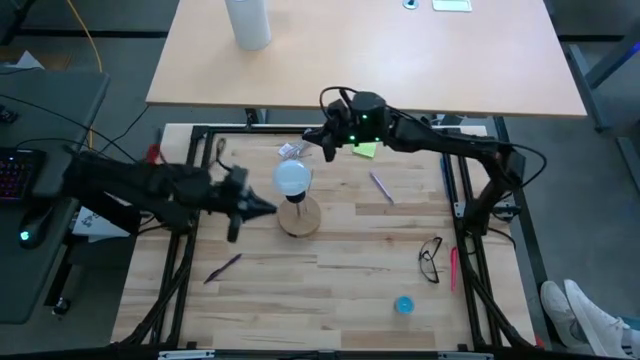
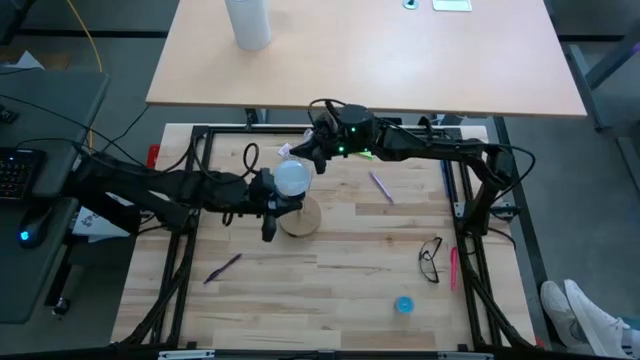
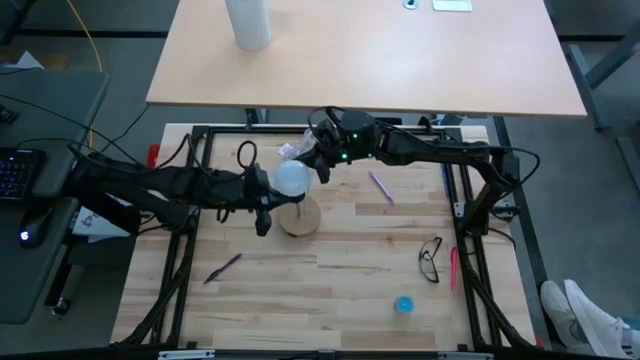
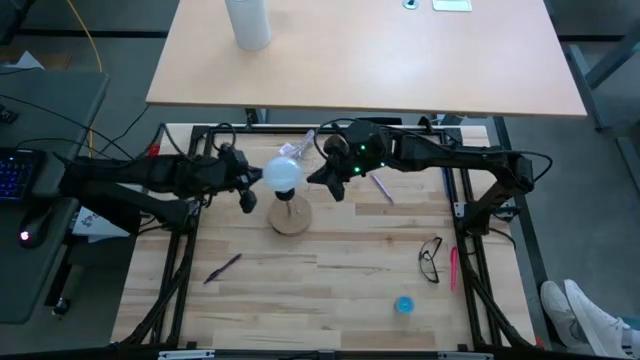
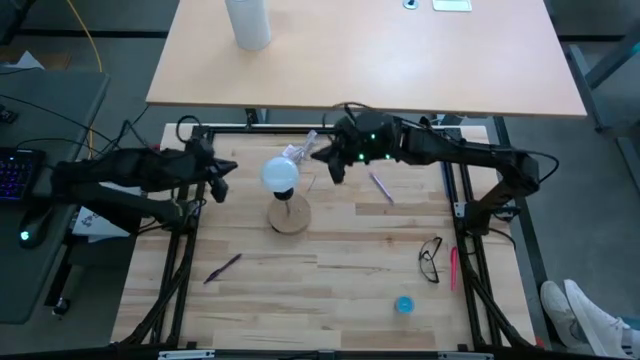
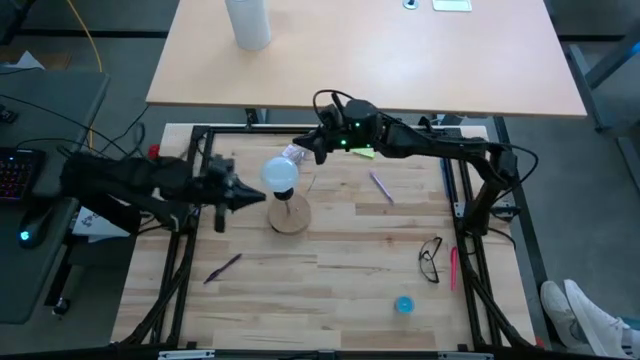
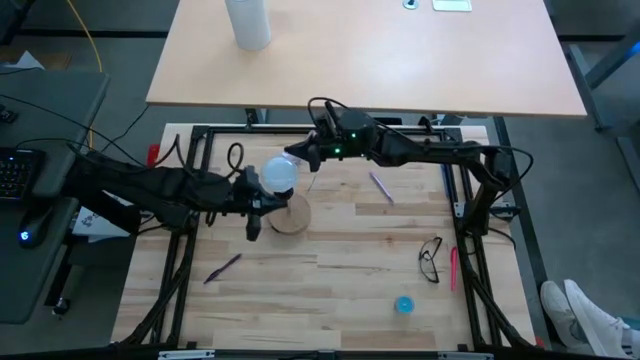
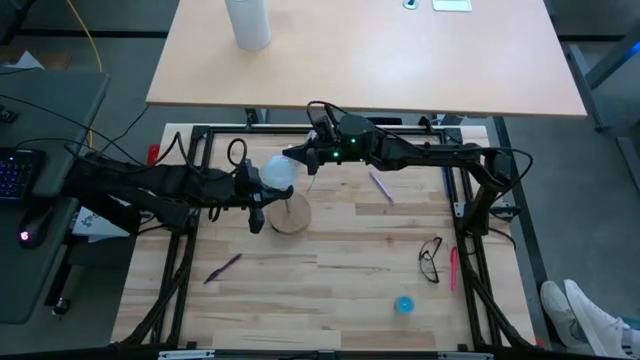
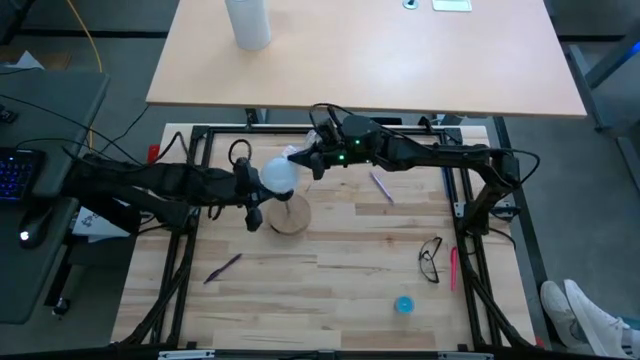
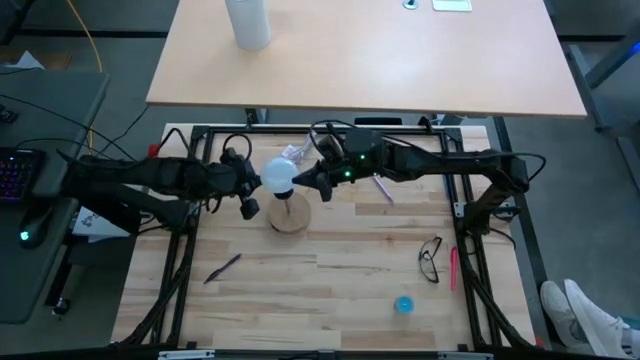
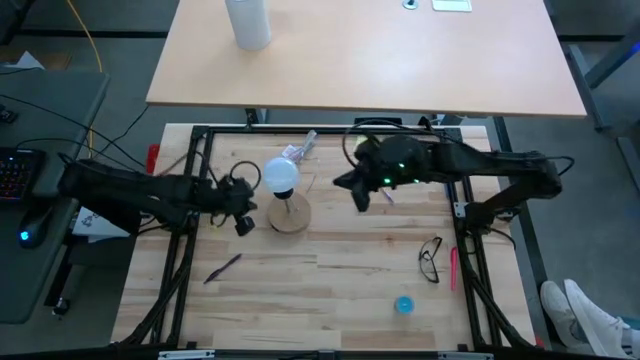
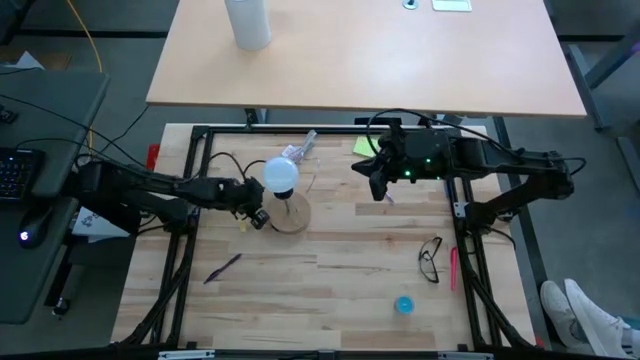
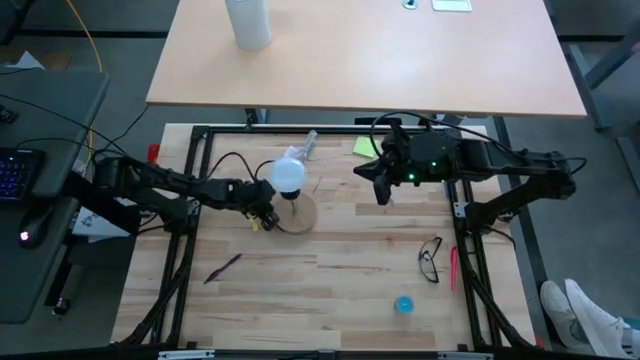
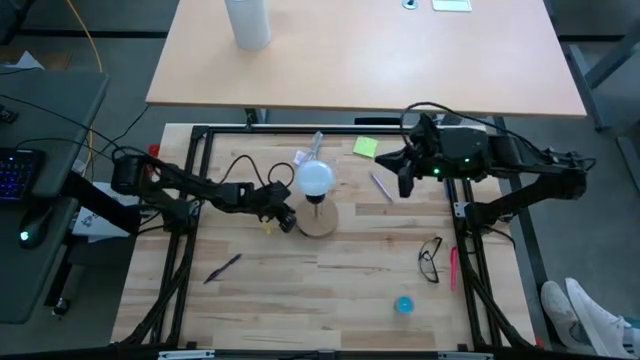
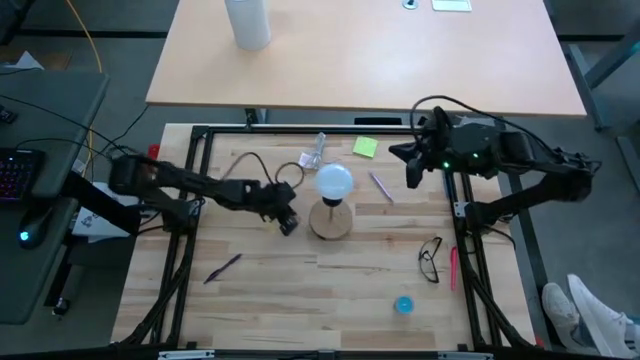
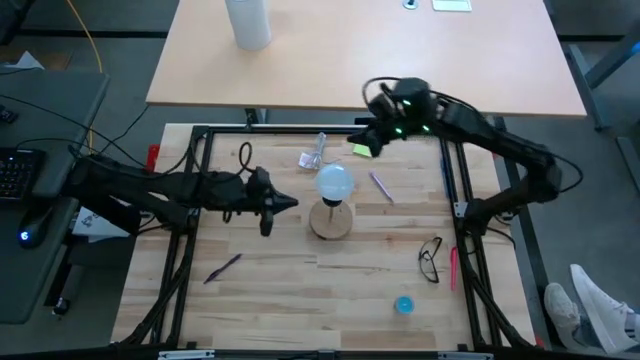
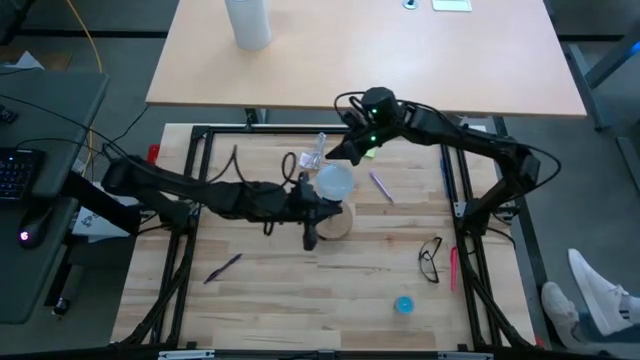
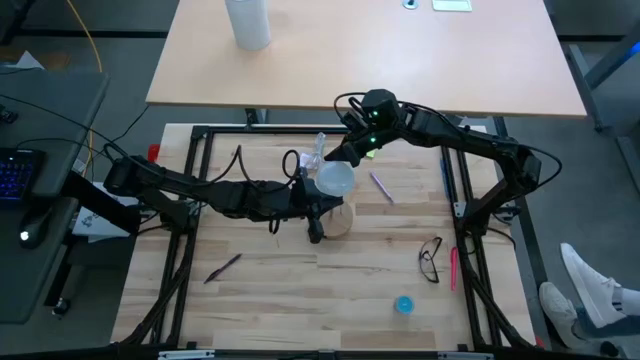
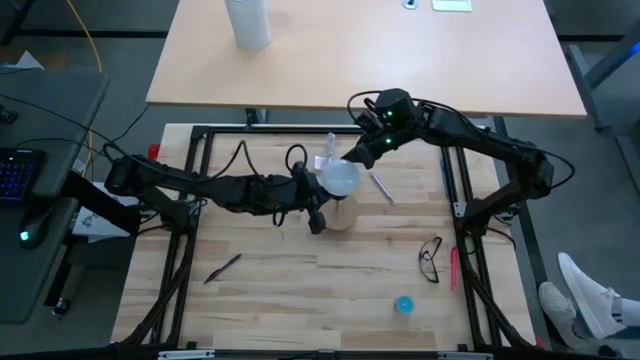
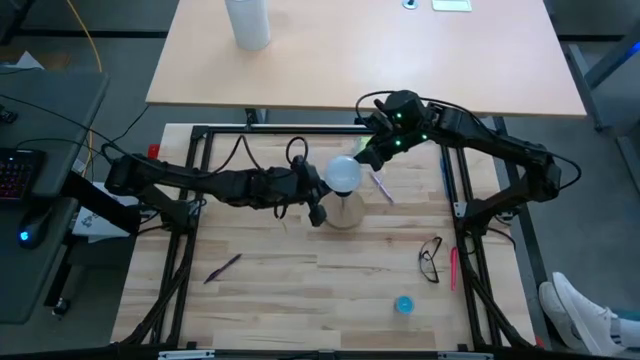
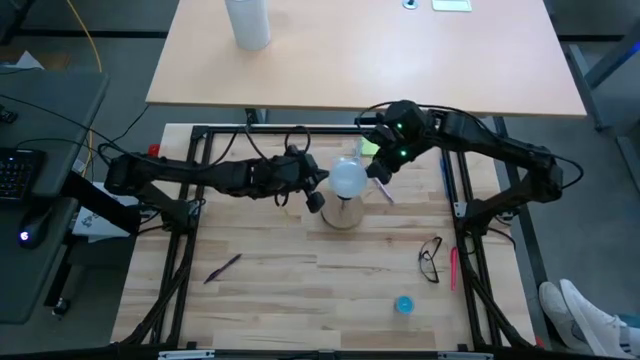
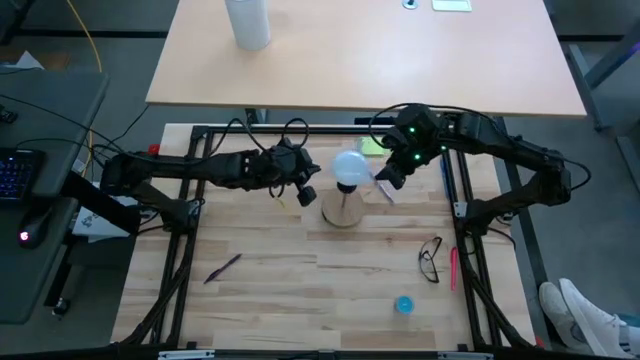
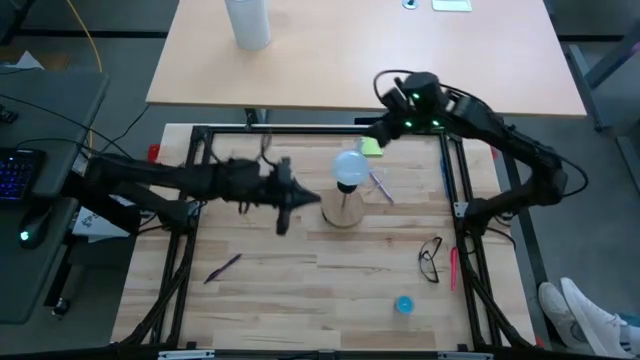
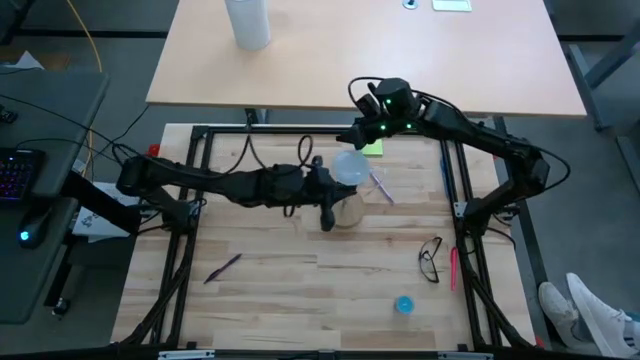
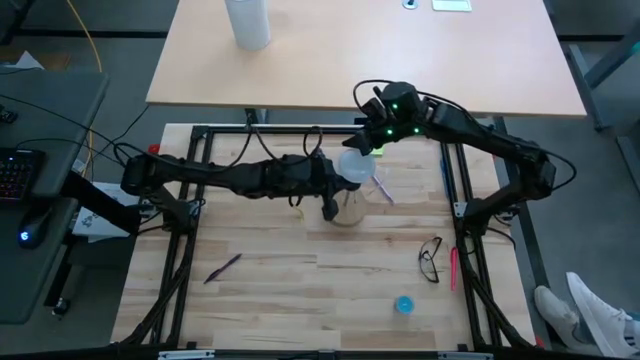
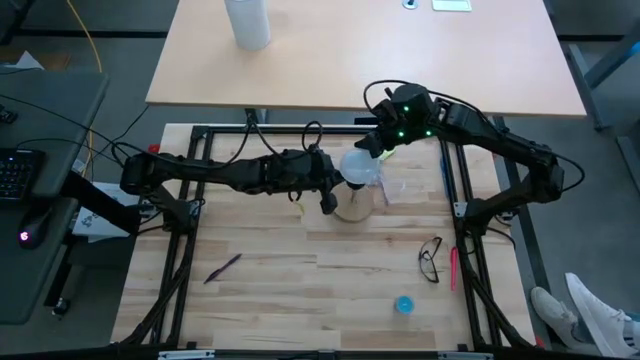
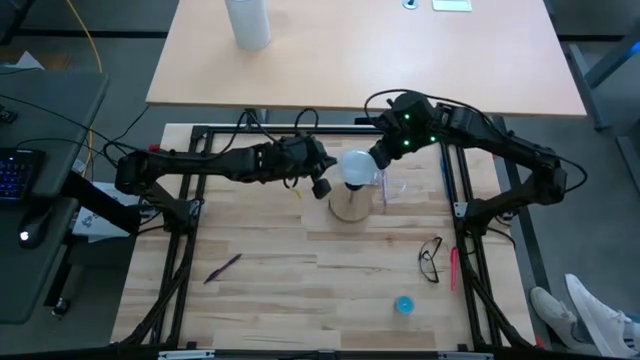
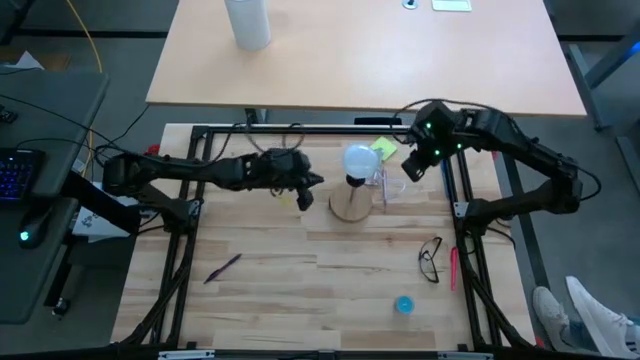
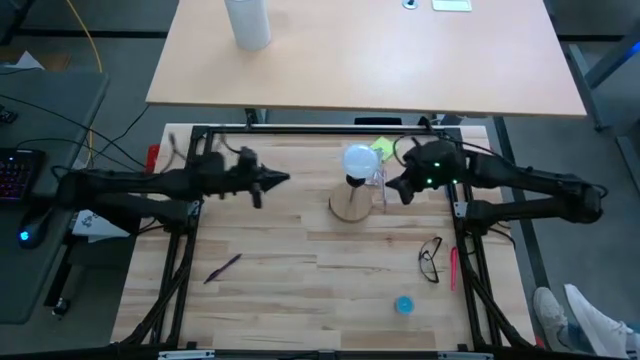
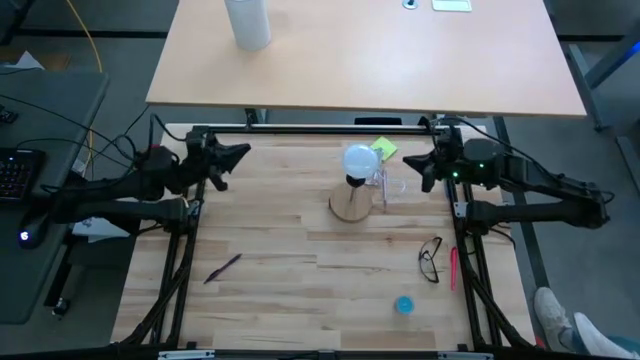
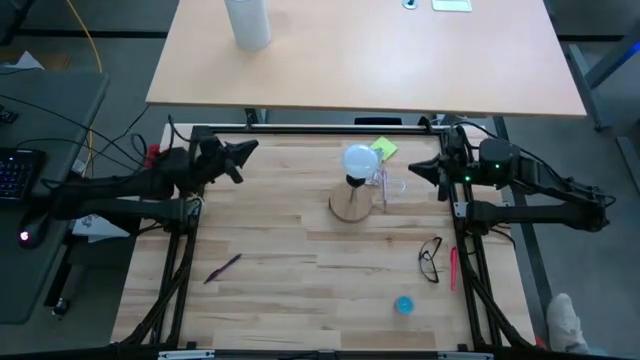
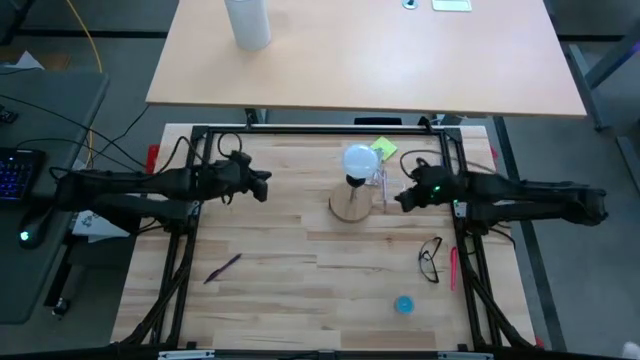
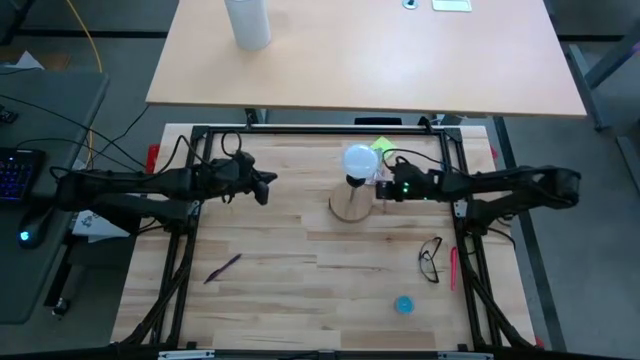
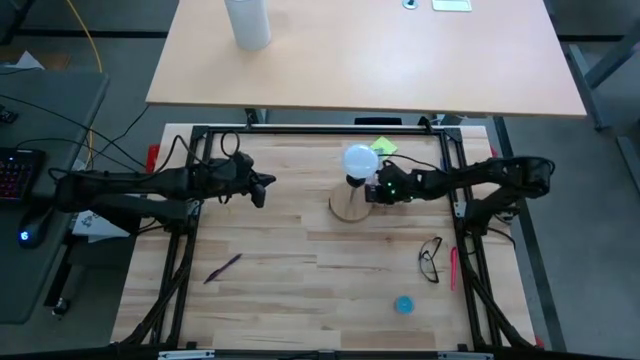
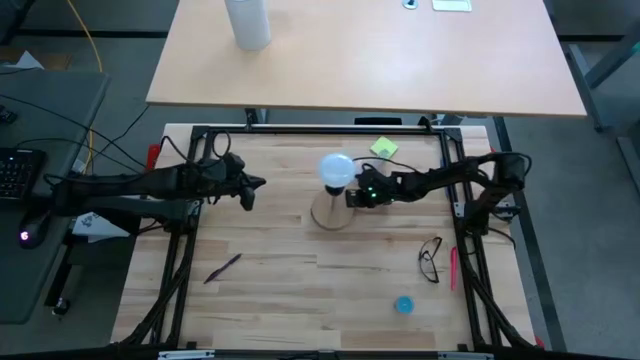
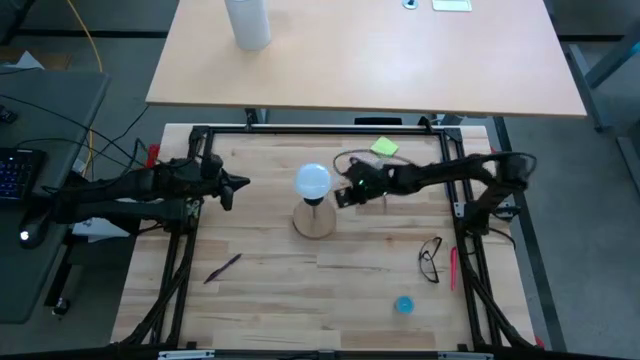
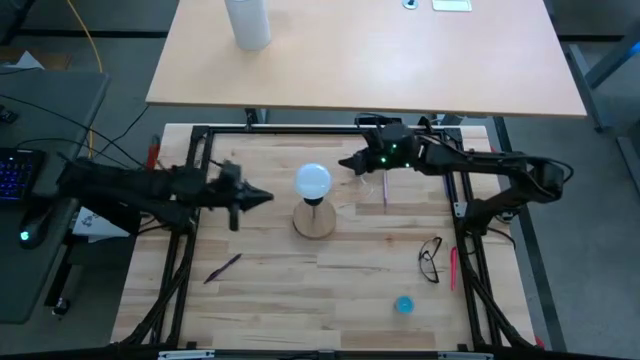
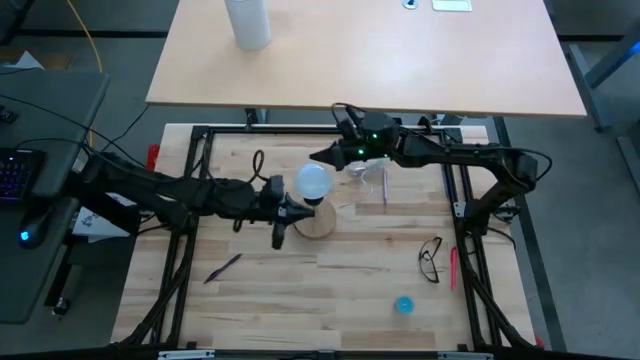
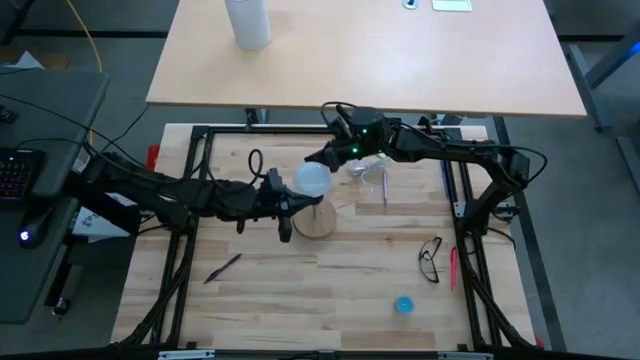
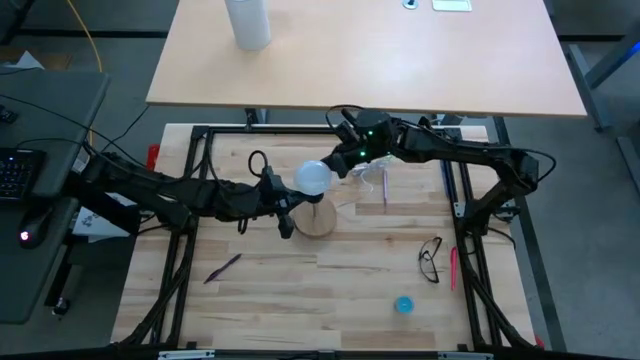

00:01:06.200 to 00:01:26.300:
Task: Screw lightbulb
Insert the light bulb into the lamp
